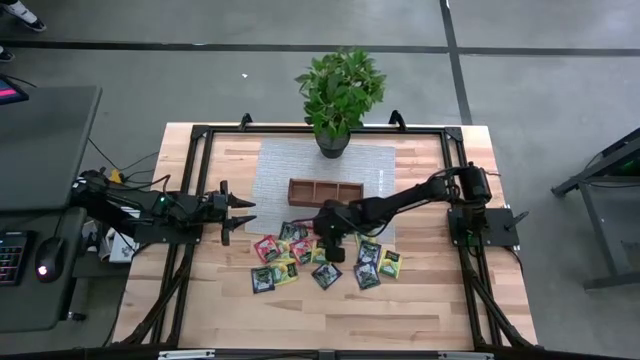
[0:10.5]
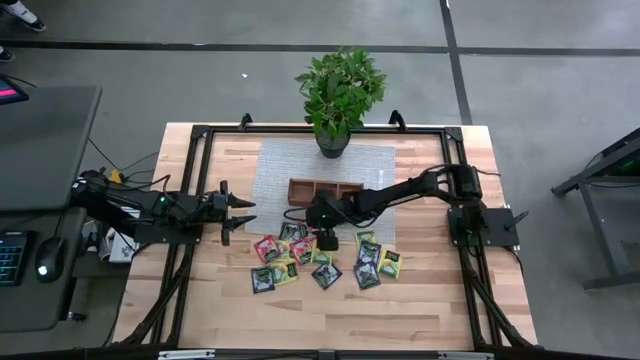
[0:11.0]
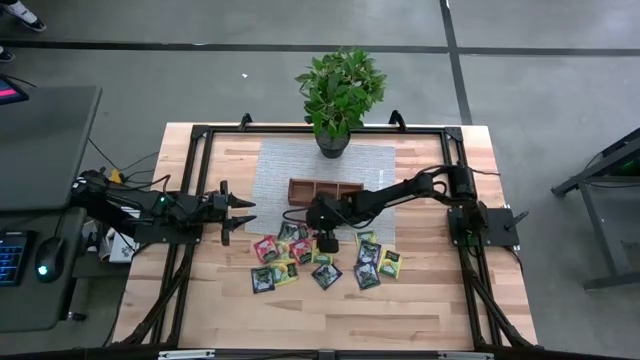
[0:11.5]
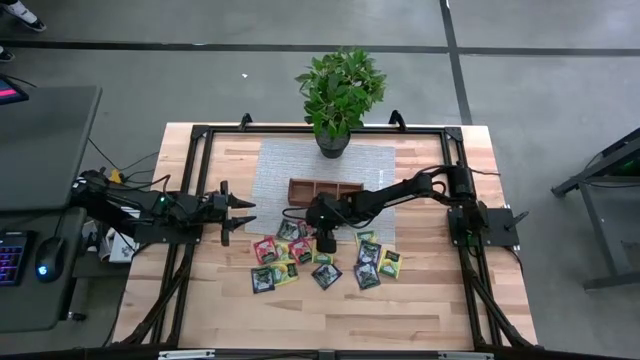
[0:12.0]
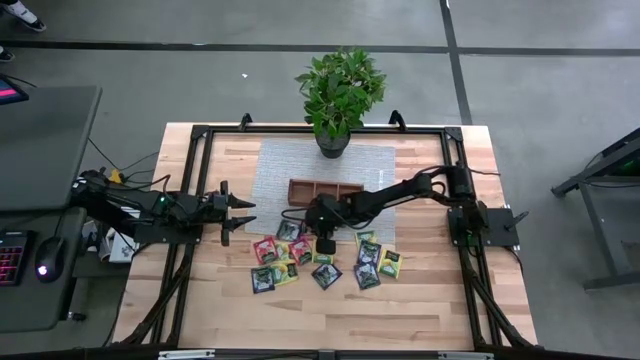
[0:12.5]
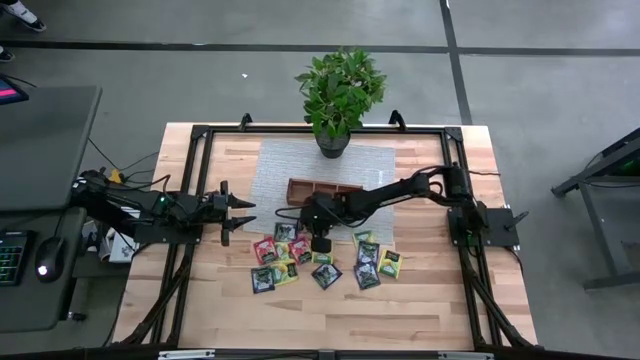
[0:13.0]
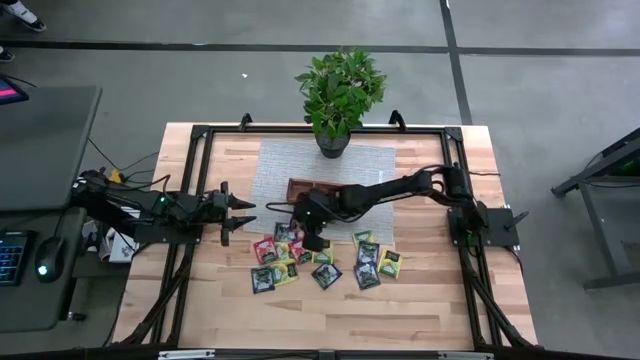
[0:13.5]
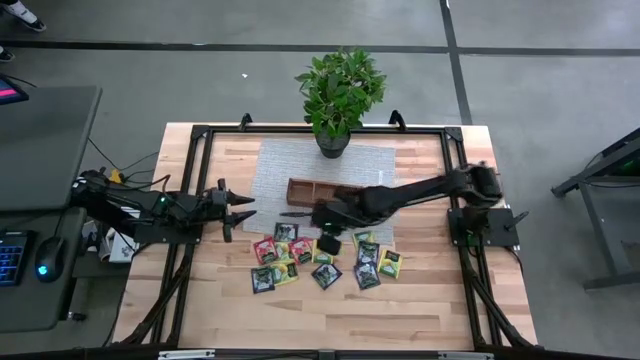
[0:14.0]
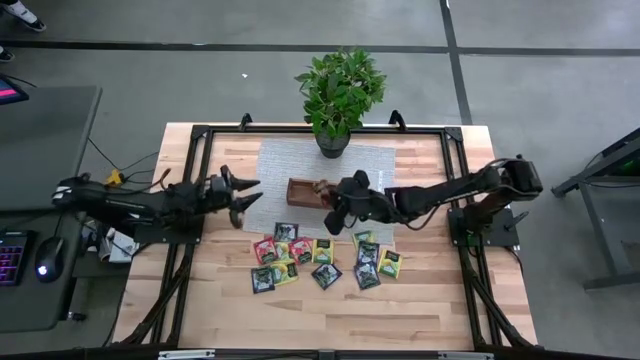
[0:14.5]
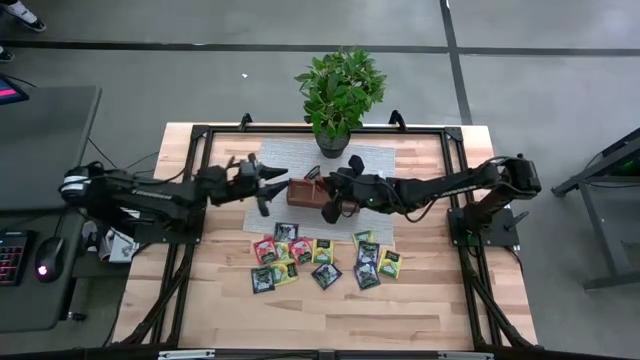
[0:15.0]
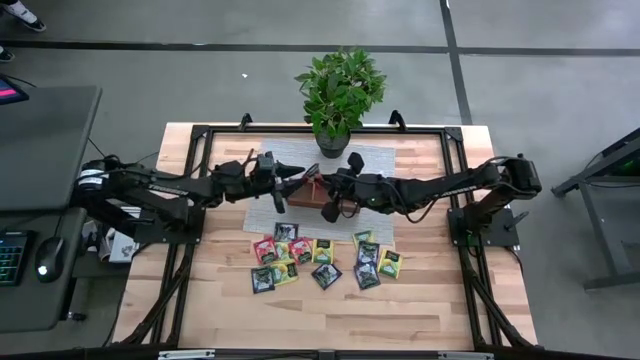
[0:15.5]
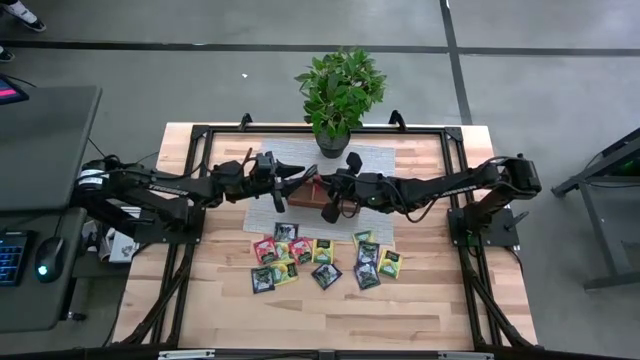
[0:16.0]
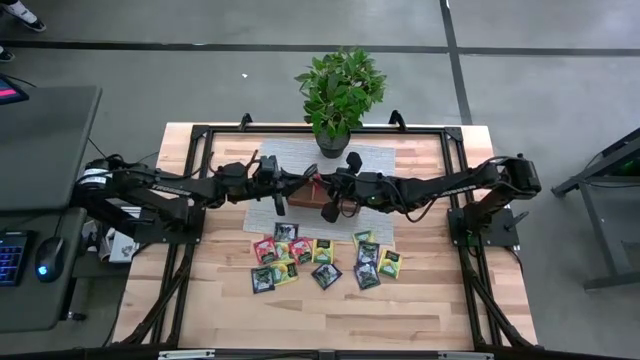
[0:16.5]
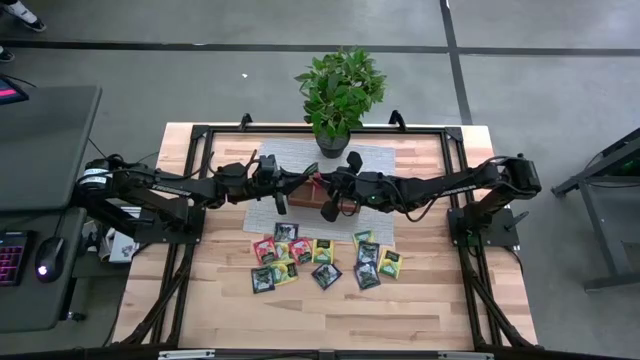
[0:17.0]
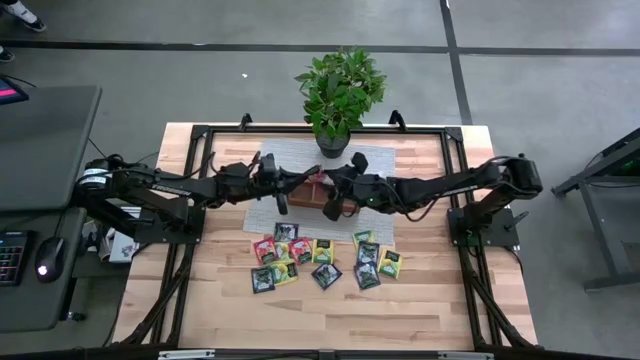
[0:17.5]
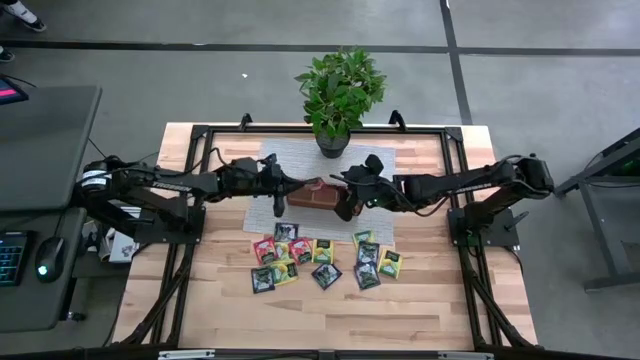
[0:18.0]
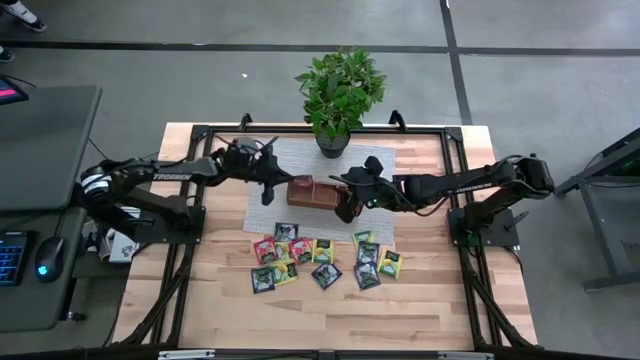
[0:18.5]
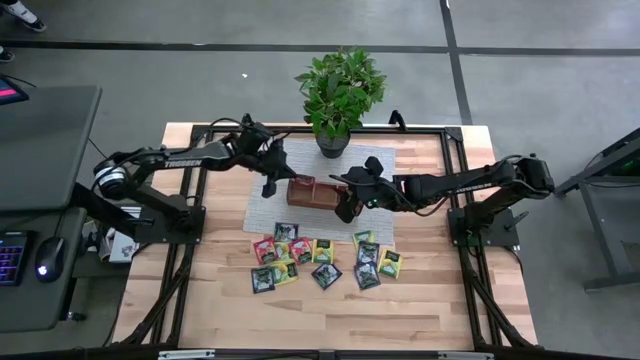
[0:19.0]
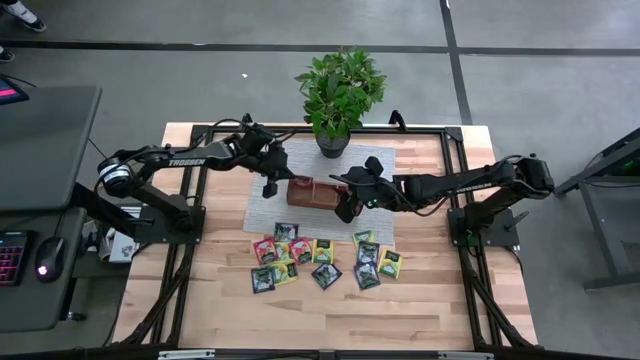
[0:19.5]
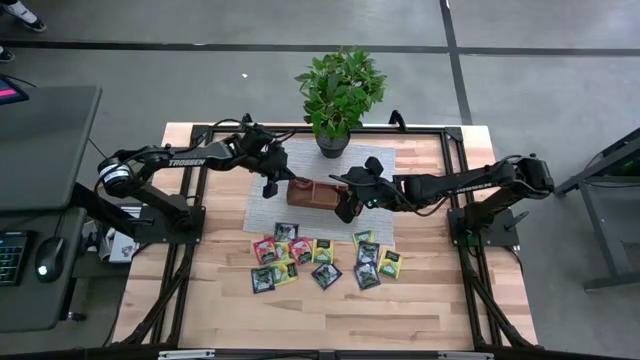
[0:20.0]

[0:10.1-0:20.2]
Task: Pick & Place Tea
Put the red tea bag into the left section of the wooden organizer

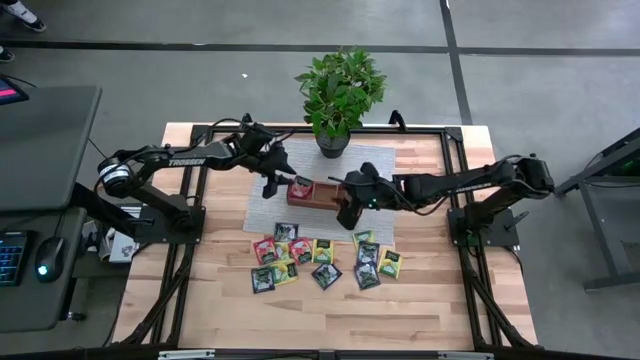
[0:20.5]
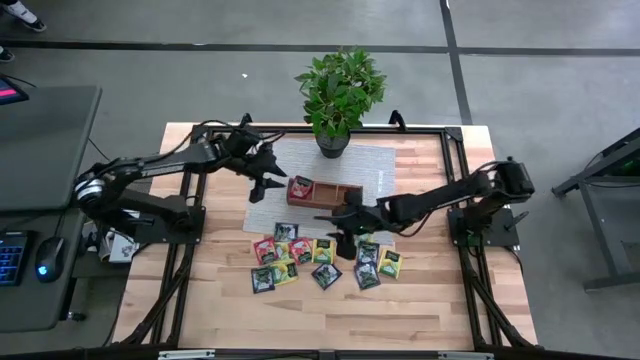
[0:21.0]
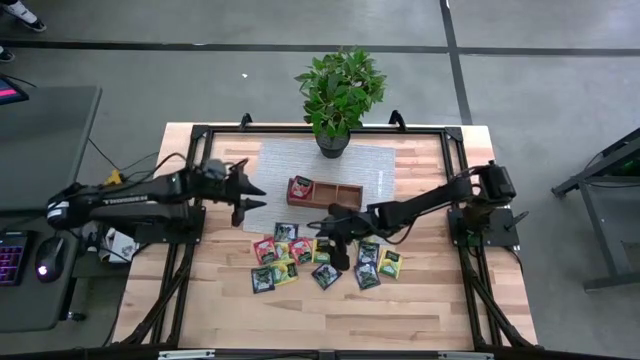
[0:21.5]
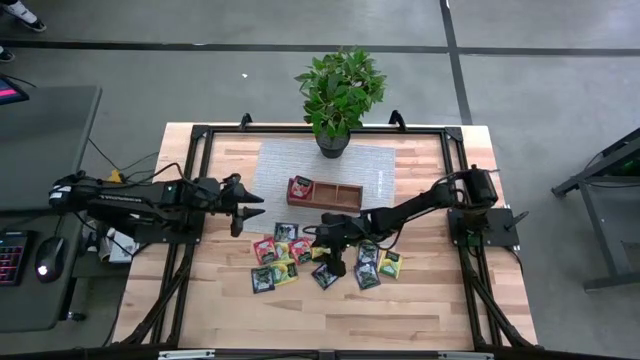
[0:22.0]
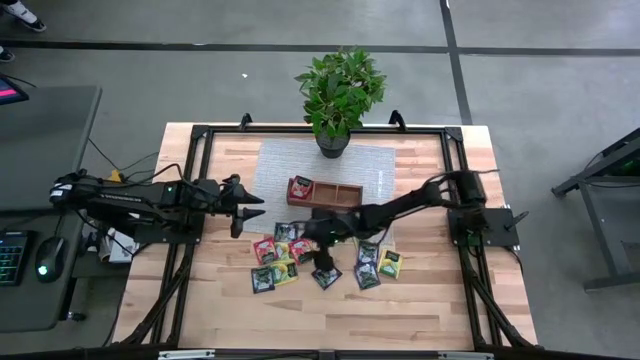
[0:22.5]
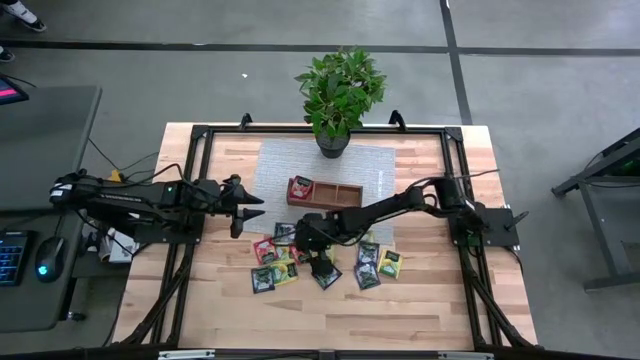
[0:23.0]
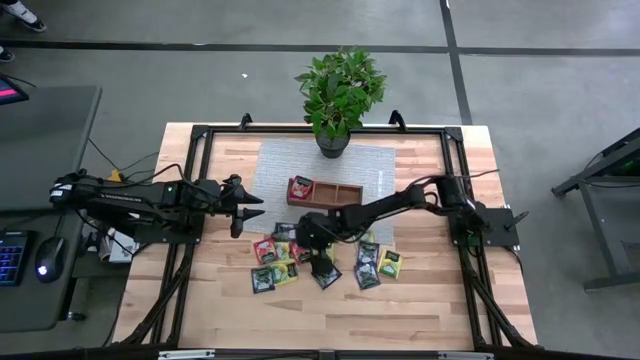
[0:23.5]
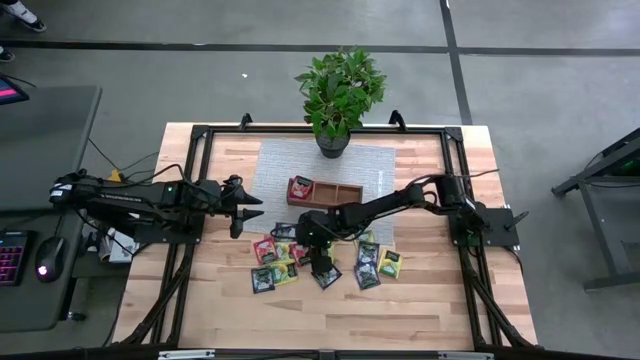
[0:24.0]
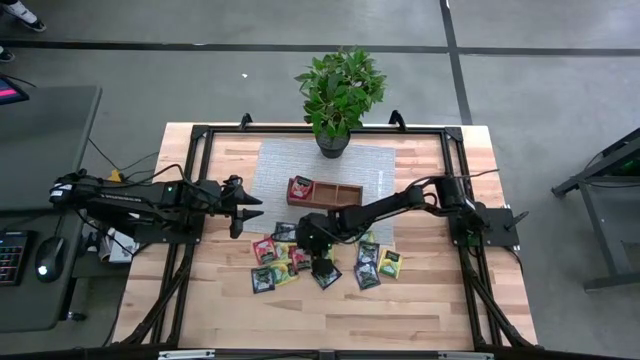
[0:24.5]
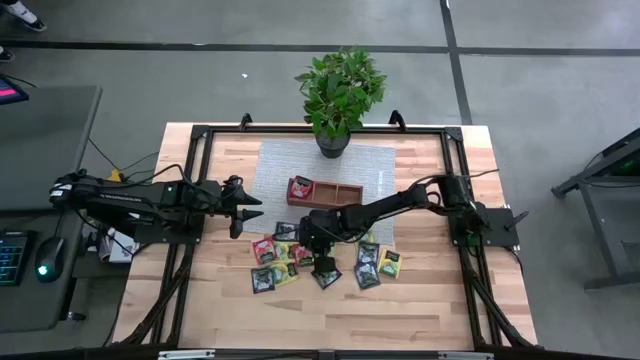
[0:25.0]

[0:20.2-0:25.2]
Put the red tea bag into the left section of the wooden organizer

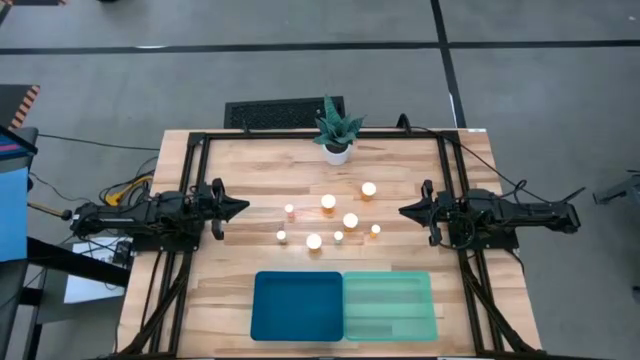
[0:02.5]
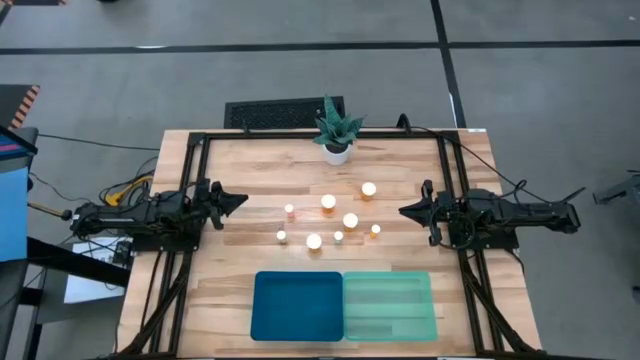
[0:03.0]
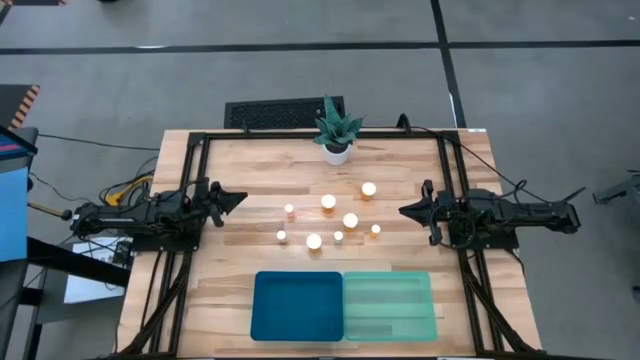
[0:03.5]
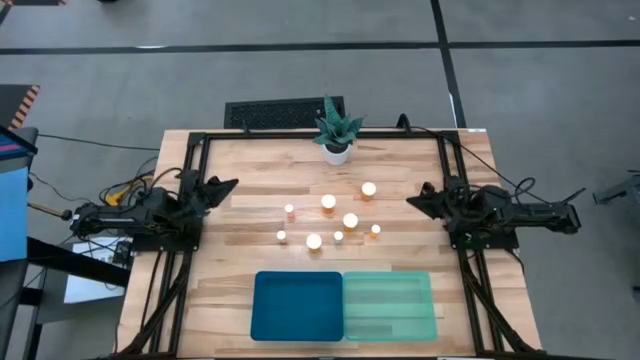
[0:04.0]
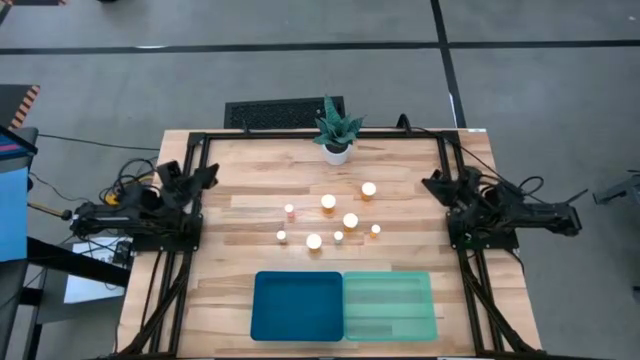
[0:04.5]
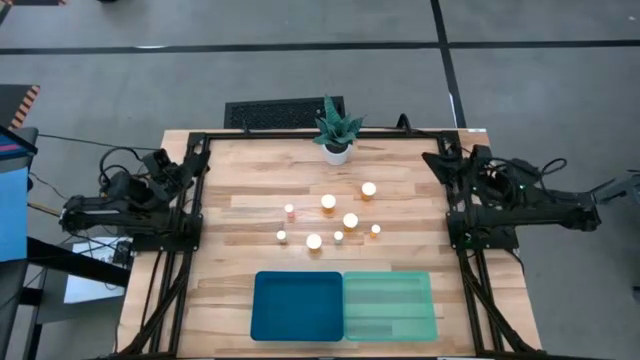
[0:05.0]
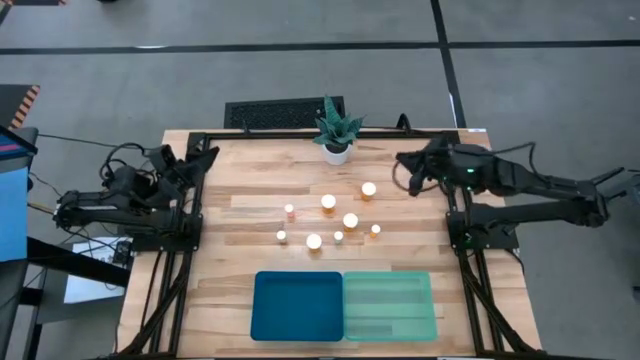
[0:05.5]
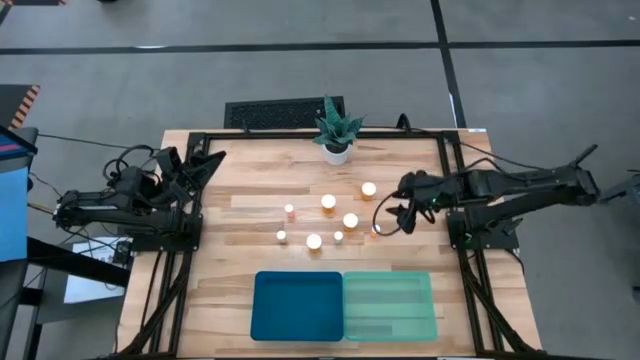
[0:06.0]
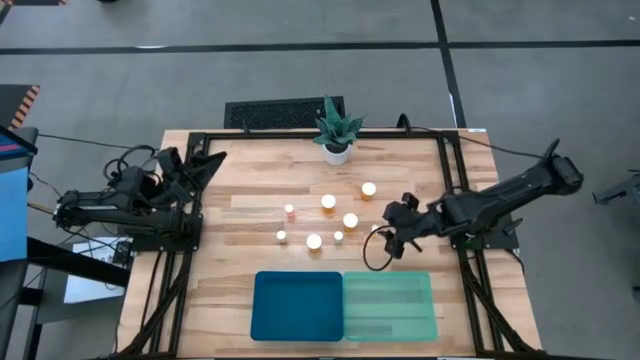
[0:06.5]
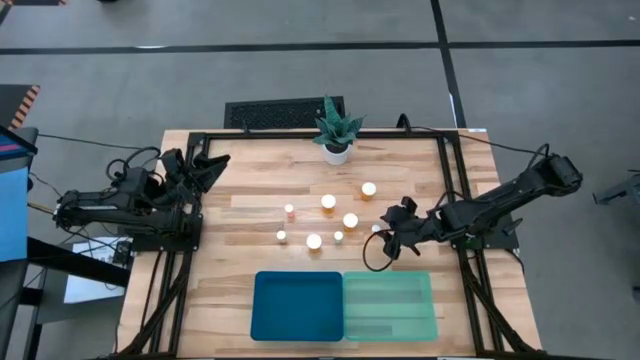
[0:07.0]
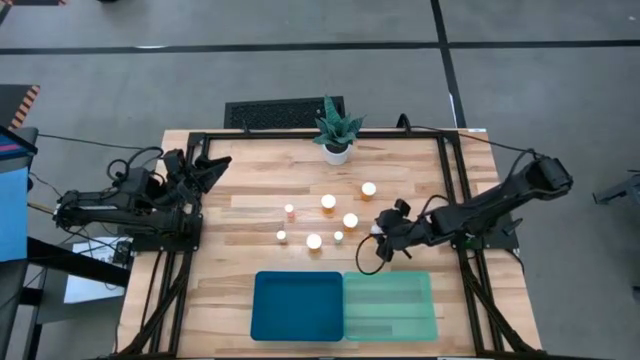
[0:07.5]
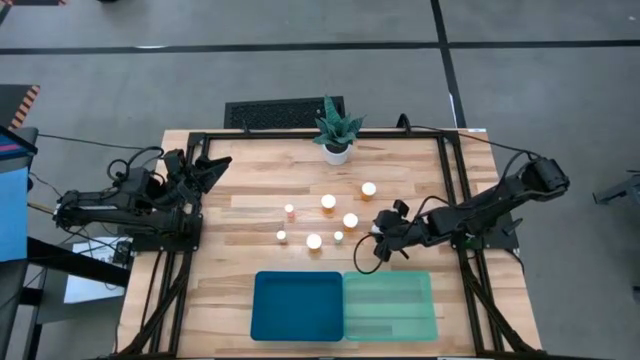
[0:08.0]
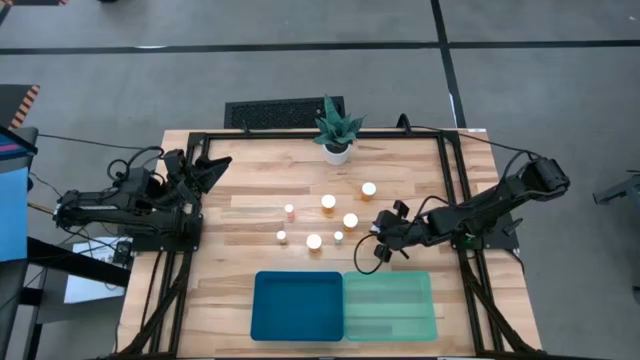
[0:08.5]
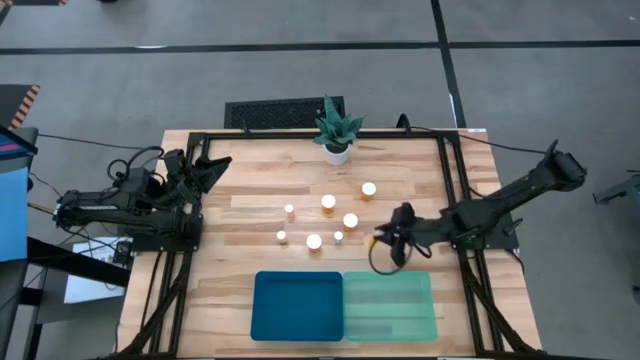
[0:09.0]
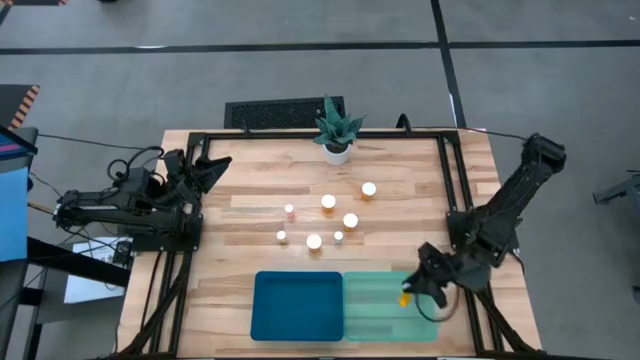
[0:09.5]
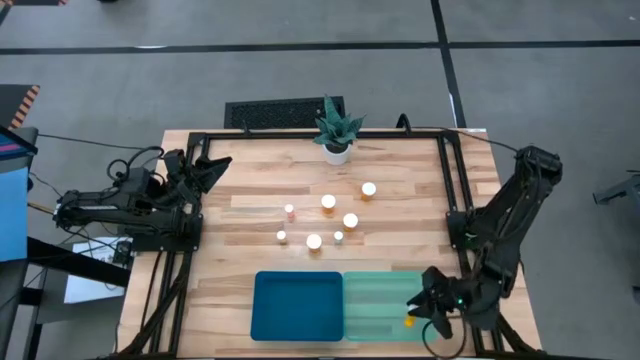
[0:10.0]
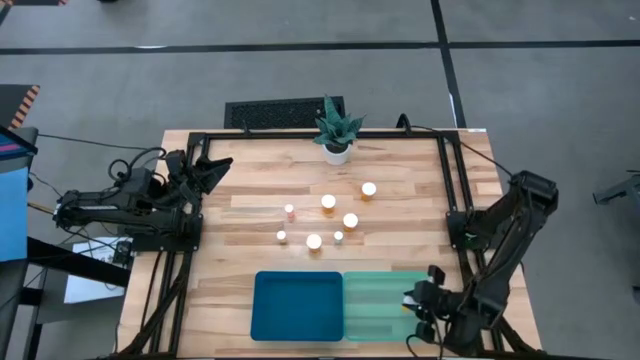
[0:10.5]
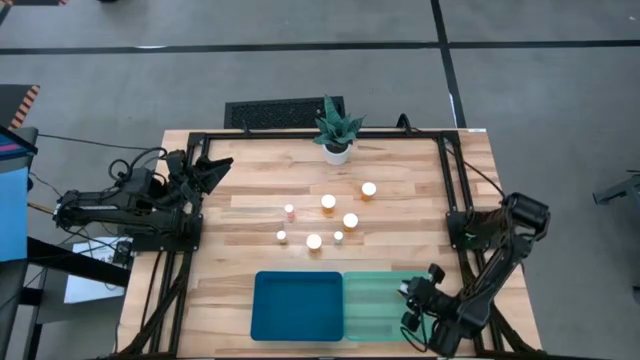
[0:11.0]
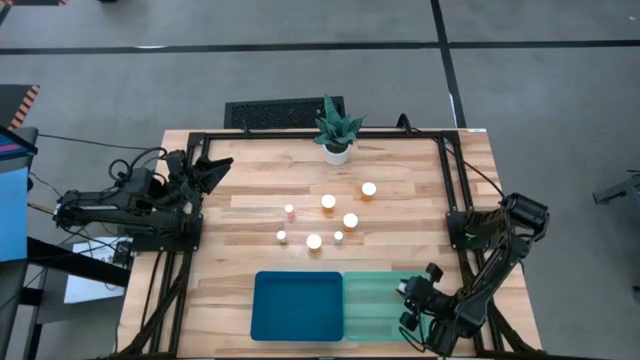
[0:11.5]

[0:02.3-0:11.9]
Task: Pick and place medicine bottles into bin by pill shape (circle, oval)
Put the small orange pill bottle into the light blue bin
